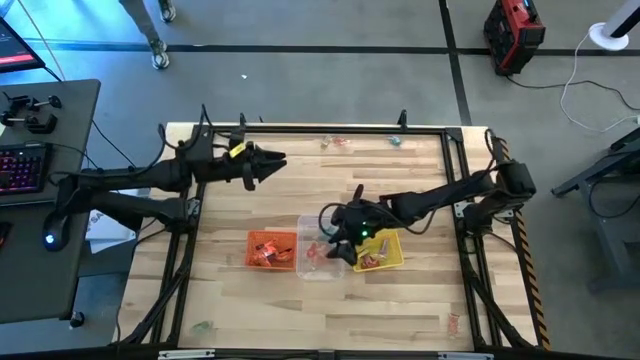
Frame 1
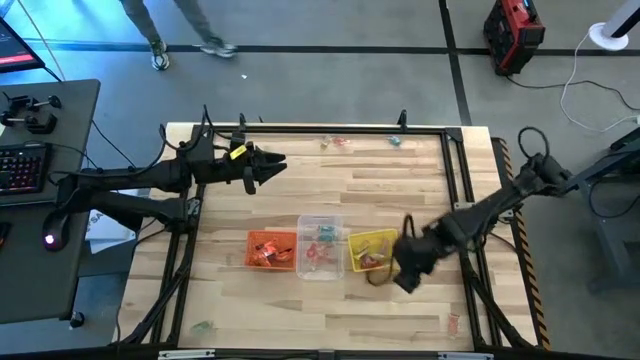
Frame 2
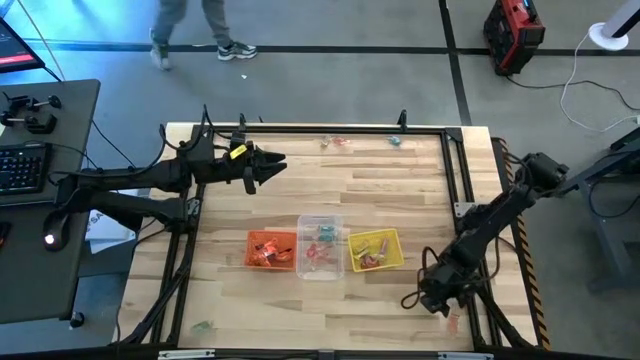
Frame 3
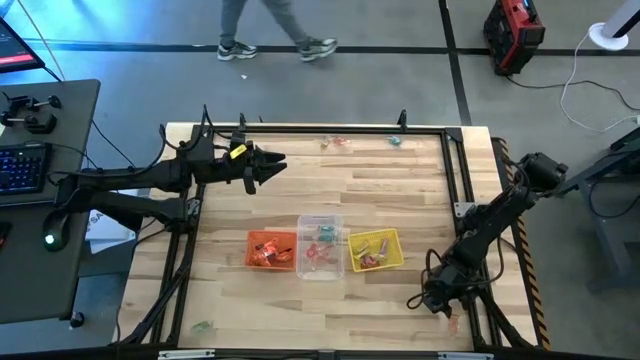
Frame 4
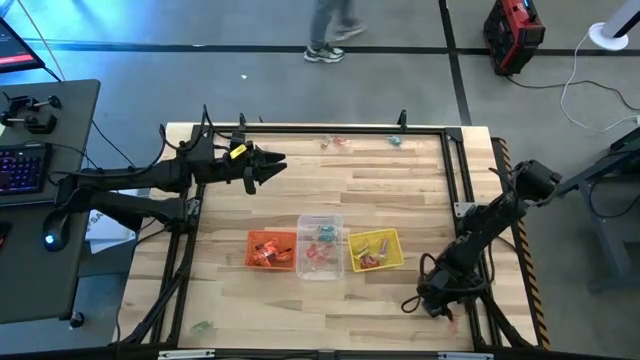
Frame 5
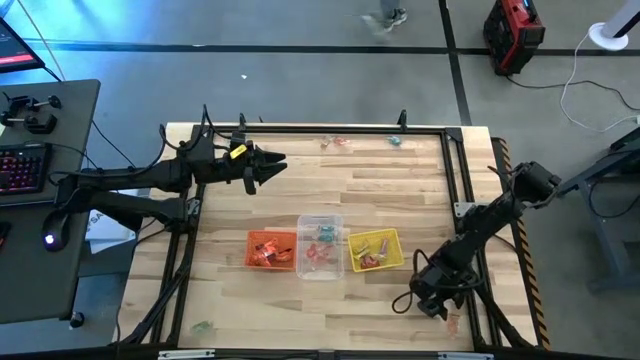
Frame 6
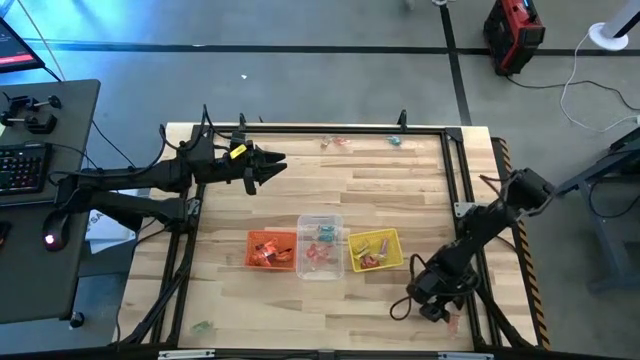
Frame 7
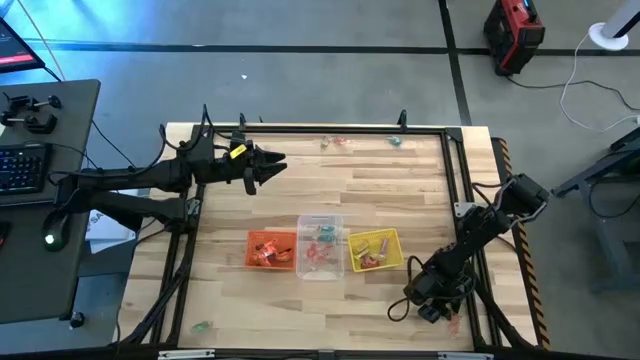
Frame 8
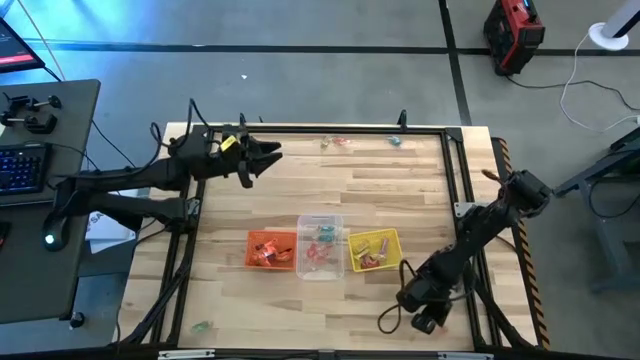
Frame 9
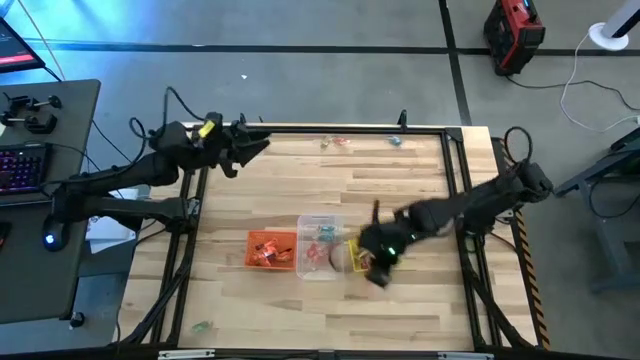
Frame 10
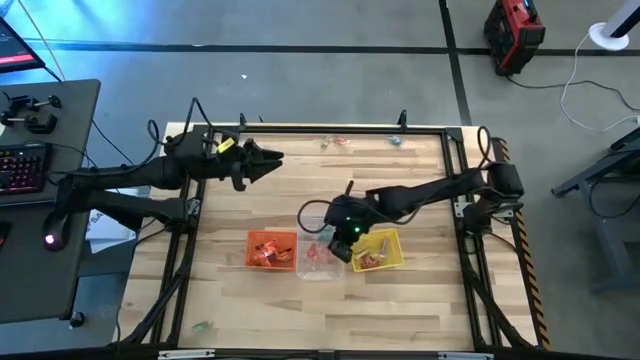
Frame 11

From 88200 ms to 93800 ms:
Task: Sort candy by brand, put in halloween buckets
Put the orange gummy into the transparent bin

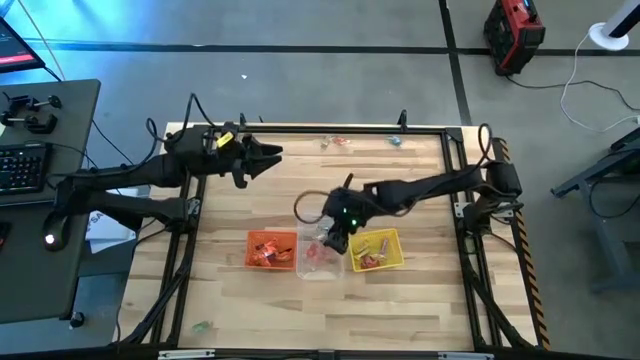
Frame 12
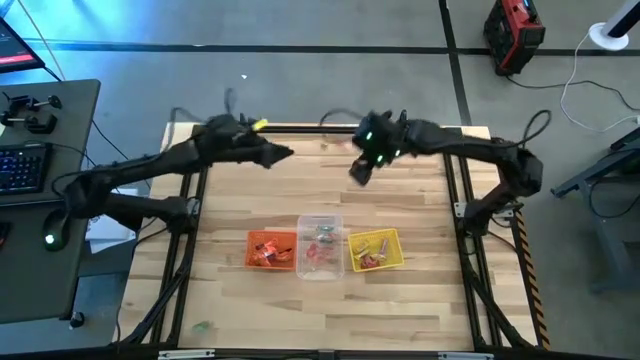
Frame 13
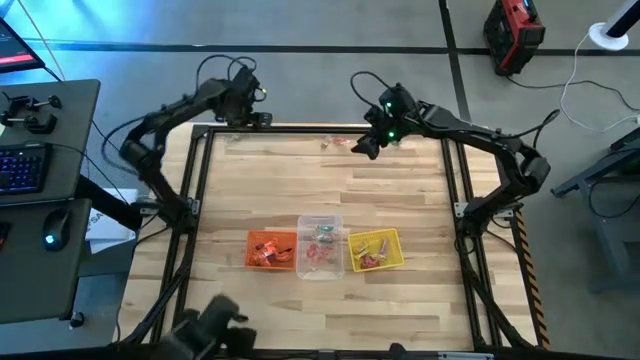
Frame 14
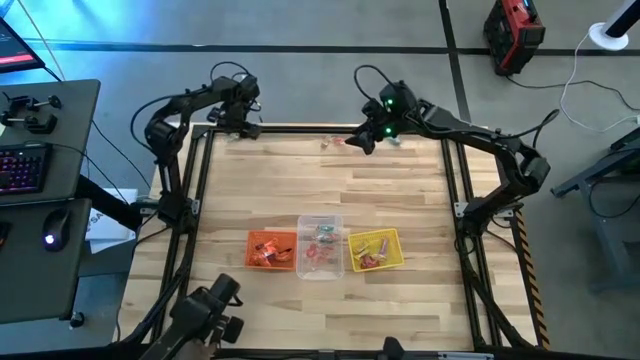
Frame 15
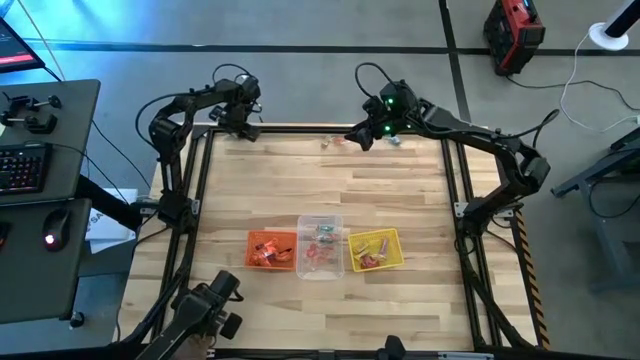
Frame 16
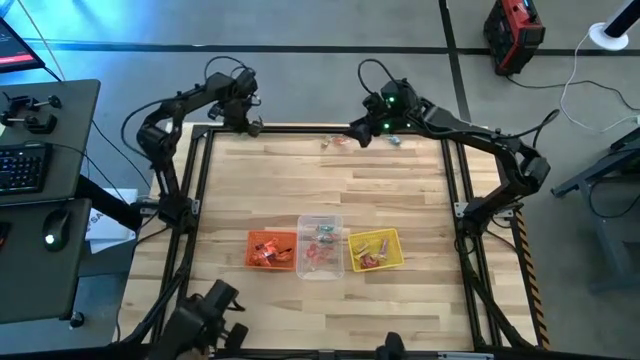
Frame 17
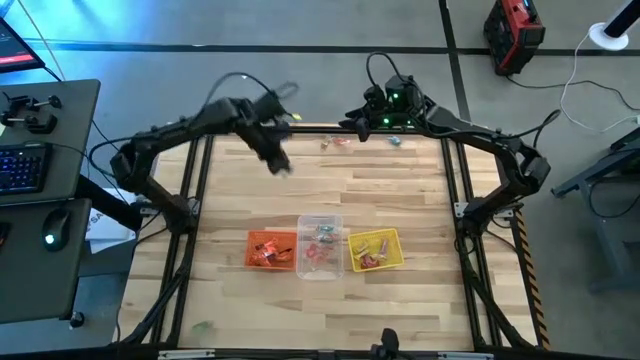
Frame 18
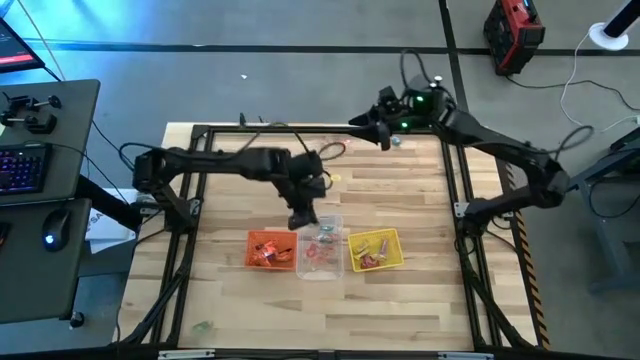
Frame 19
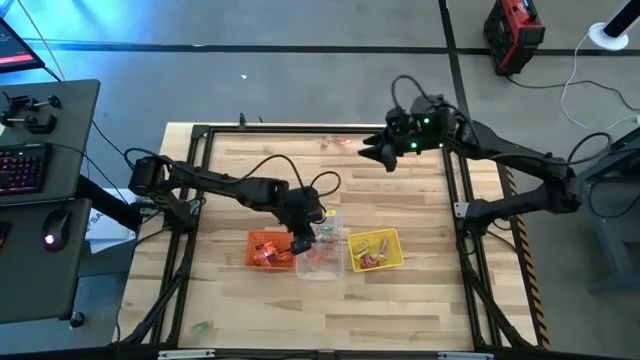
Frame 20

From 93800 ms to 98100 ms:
Put the green gummy into the transparent bin

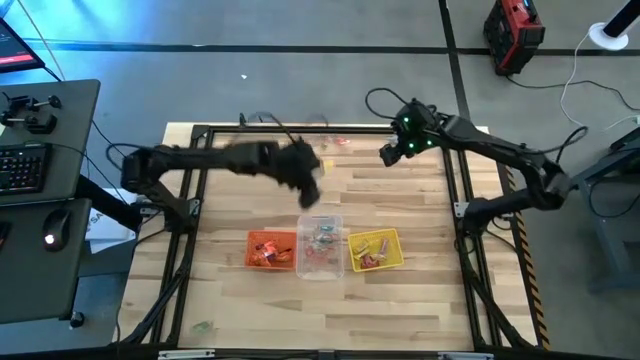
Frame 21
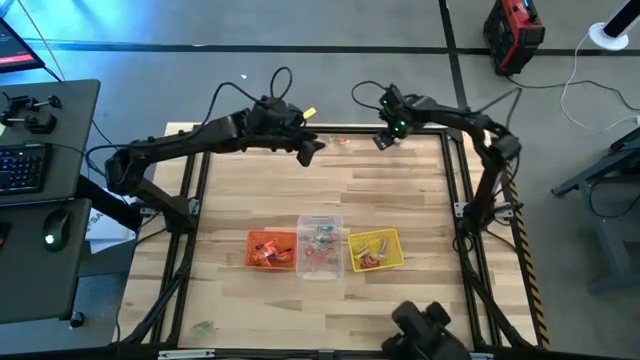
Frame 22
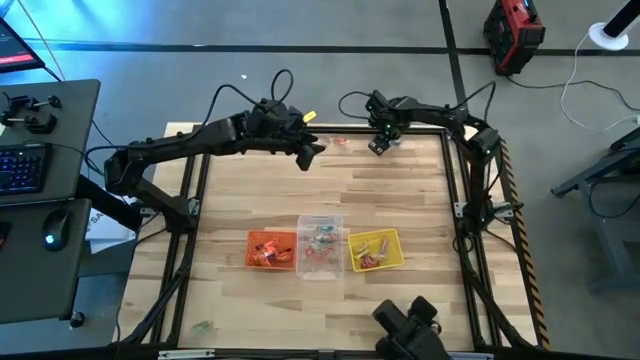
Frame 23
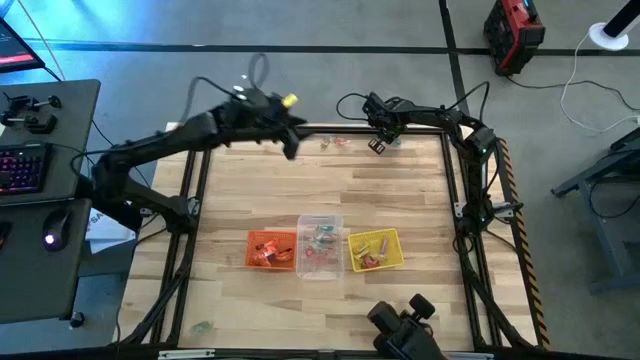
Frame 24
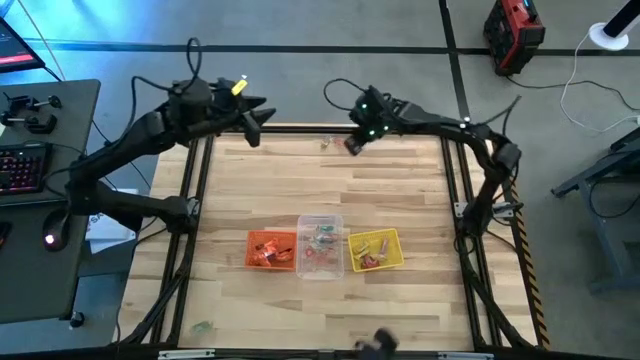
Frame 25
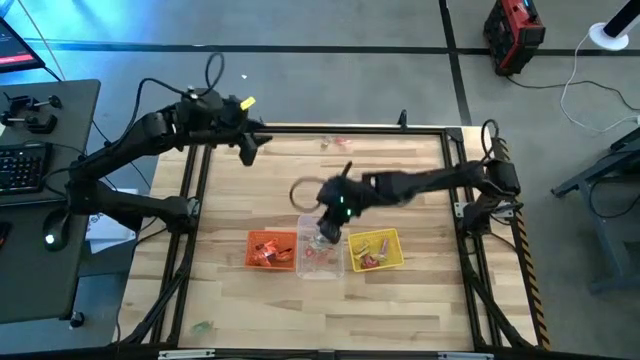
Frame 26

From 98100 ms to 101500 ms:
Put the blue gummy into the transparent bin

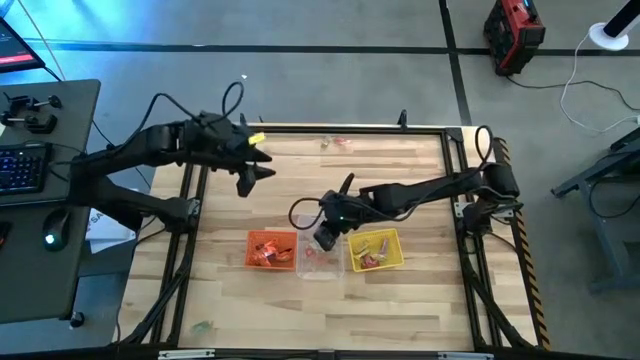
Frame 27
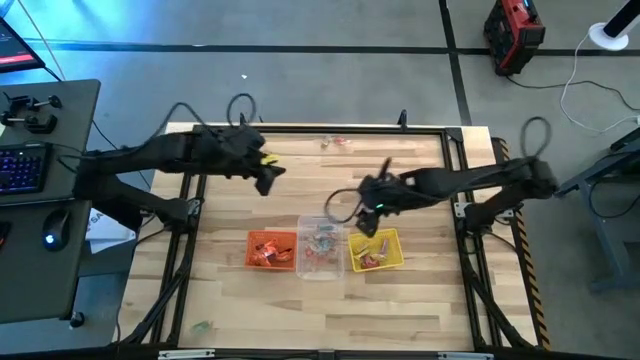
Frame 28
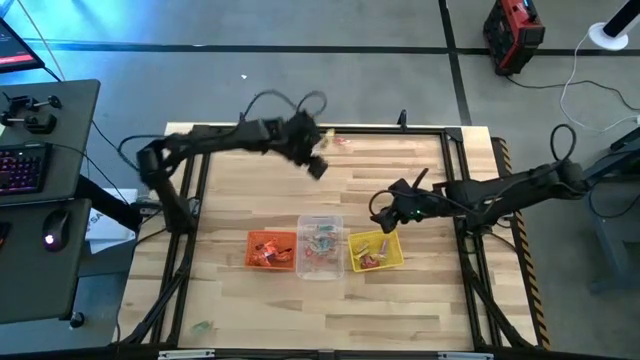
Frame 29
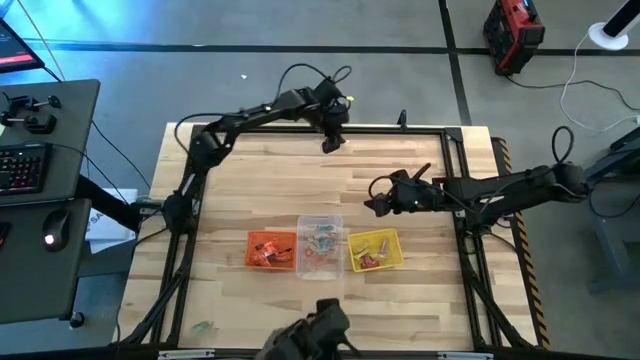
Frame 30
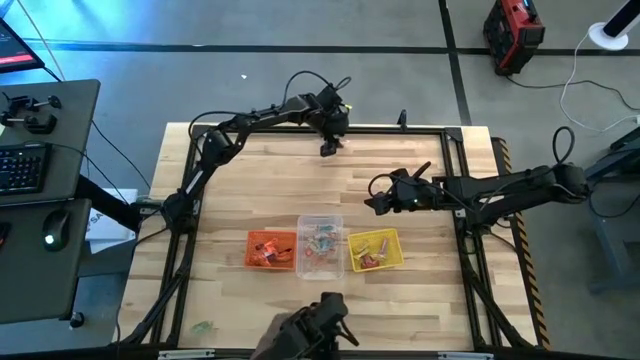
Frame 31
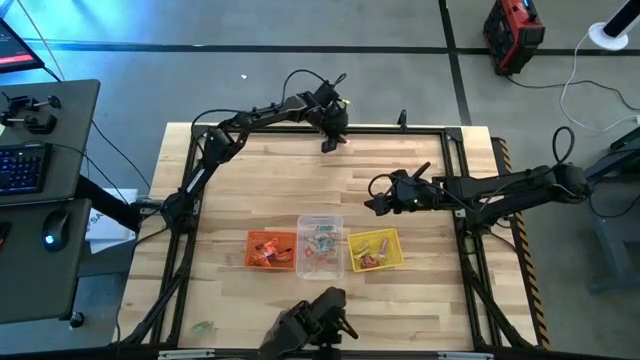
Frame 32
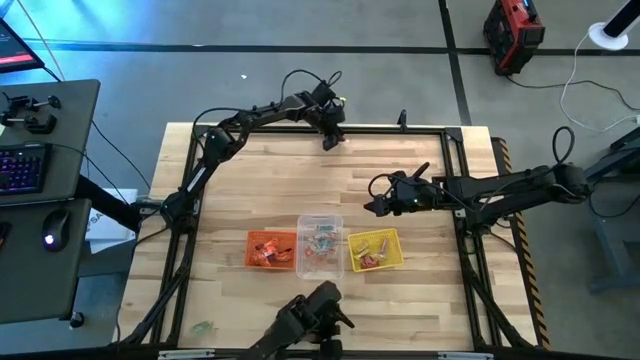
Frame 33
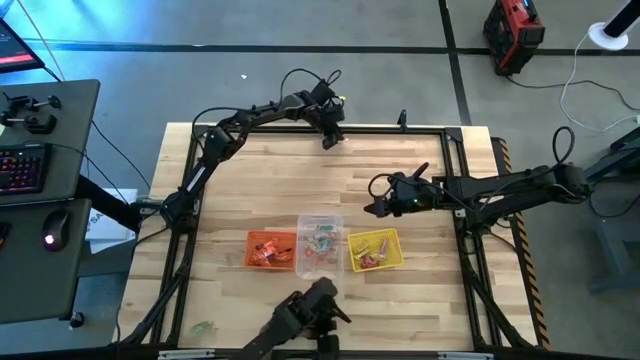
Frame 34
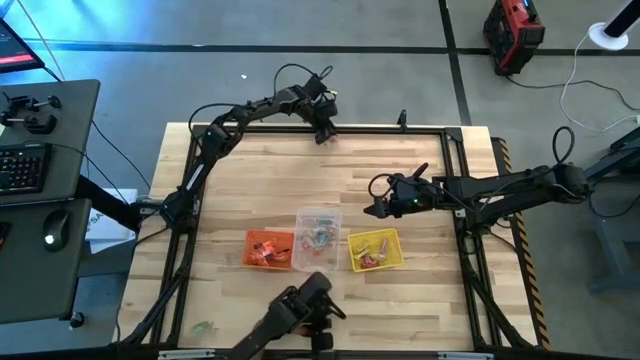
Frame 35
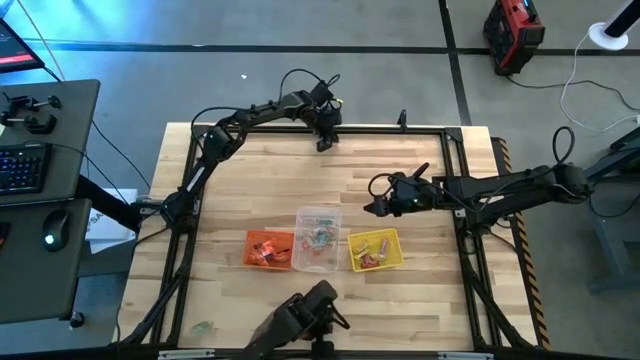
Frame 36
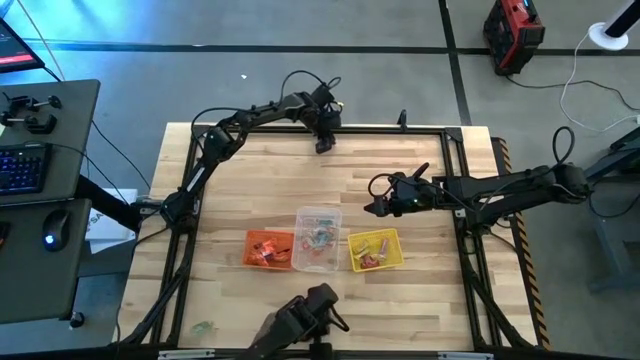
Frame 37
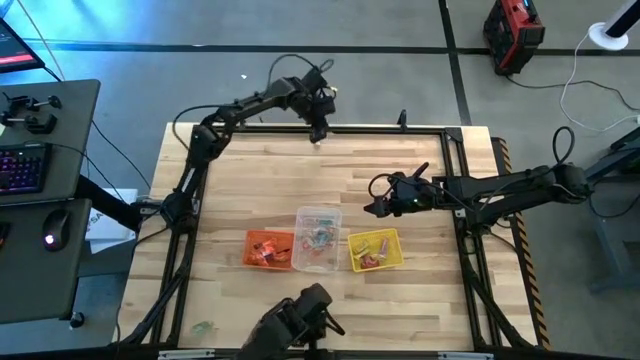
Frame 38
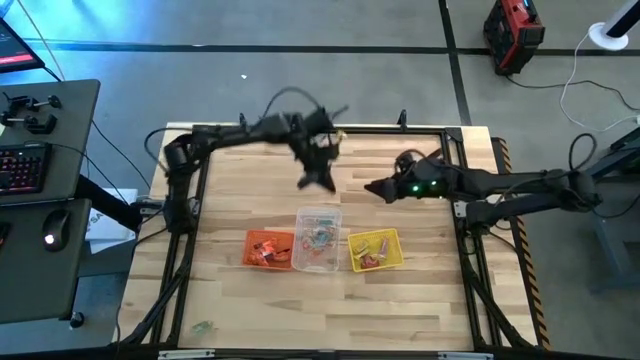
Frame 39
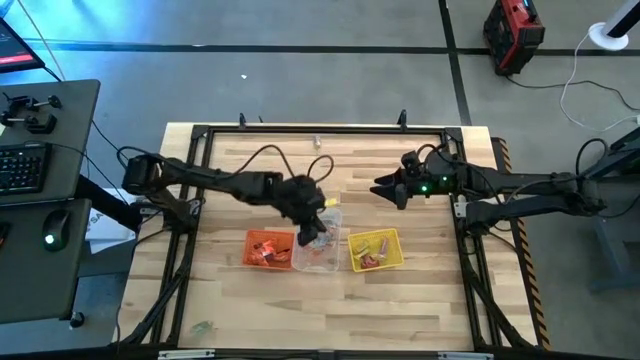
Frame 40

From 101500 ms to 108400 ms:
Put the orange gummy into the transparent bin

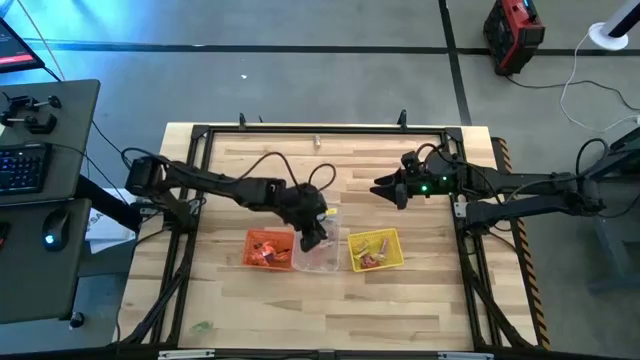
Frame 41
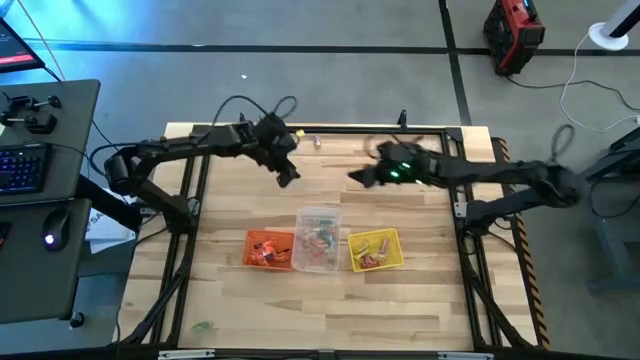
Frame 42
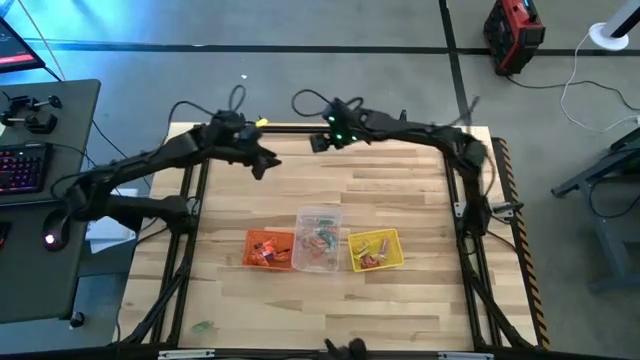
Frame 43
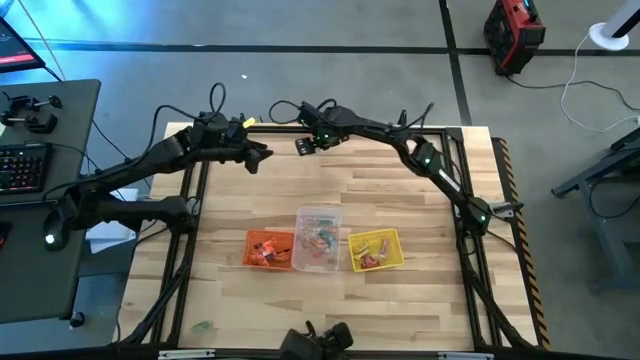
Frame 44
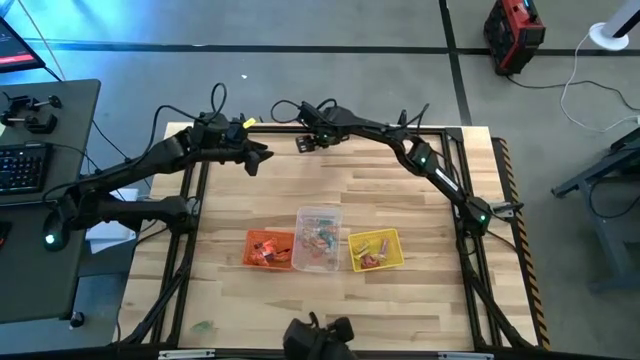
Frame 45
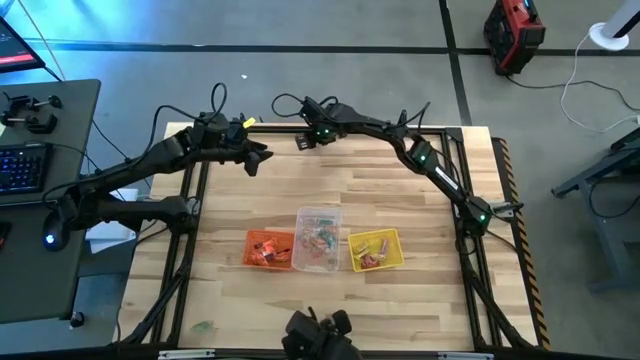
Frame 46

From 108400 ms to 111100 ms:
Put the yellow candy into the yellow bin
